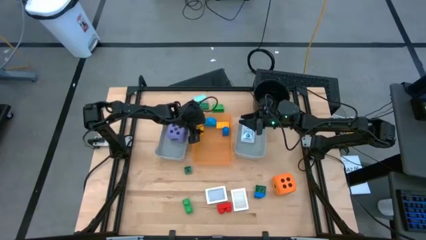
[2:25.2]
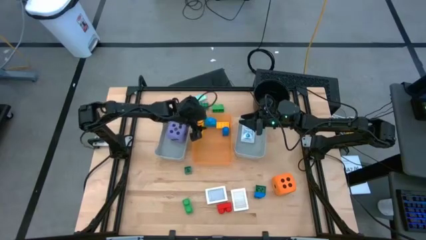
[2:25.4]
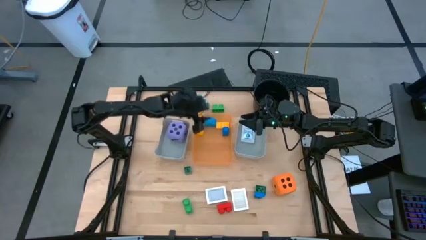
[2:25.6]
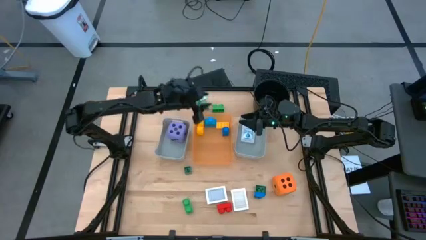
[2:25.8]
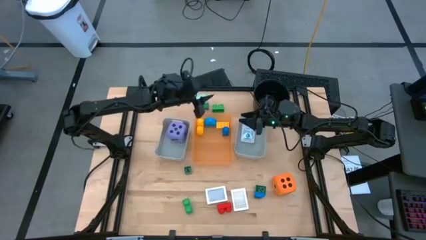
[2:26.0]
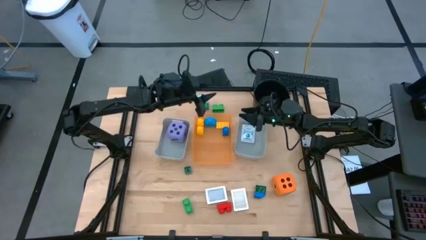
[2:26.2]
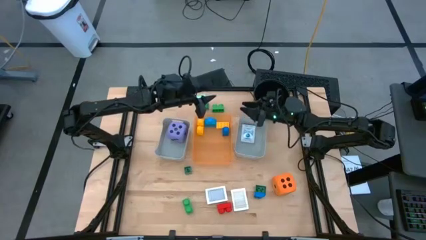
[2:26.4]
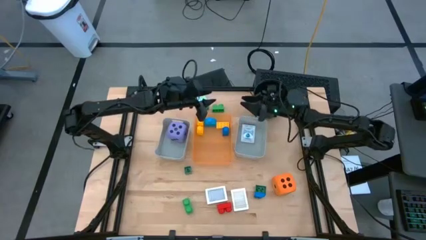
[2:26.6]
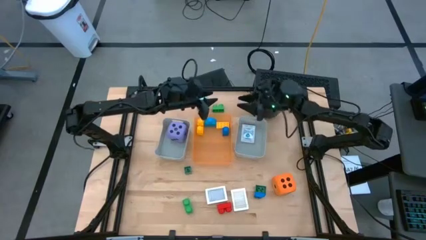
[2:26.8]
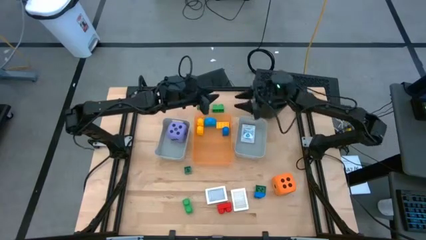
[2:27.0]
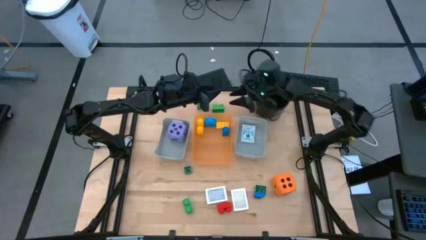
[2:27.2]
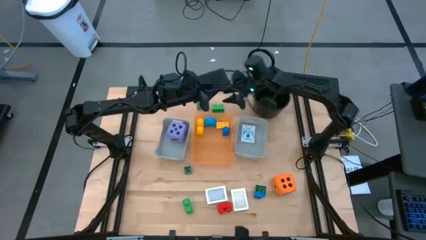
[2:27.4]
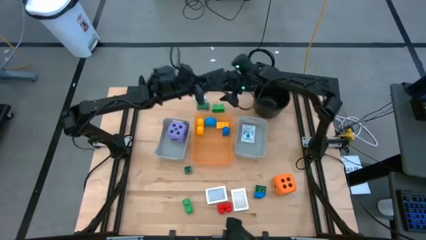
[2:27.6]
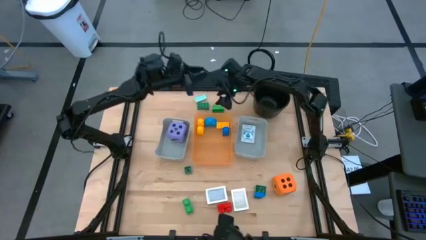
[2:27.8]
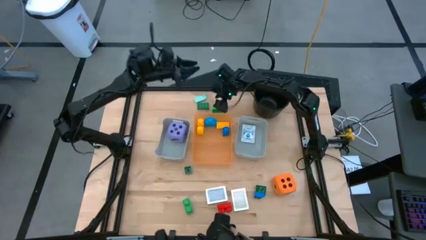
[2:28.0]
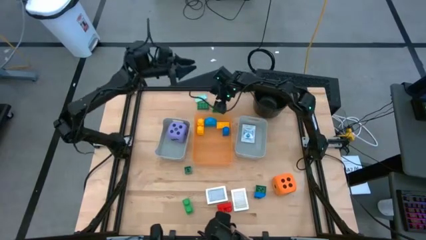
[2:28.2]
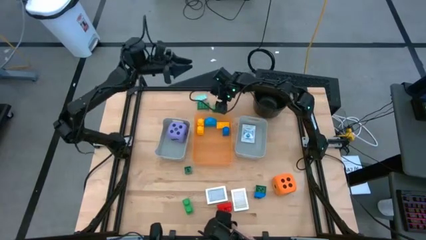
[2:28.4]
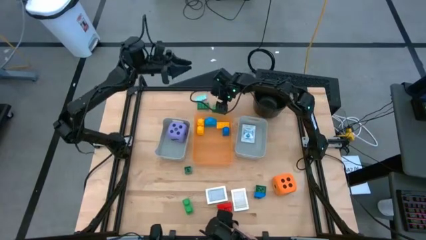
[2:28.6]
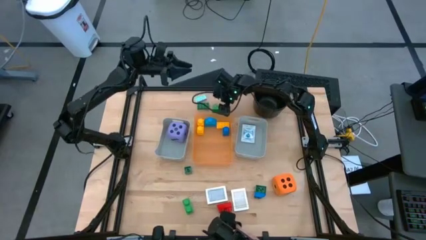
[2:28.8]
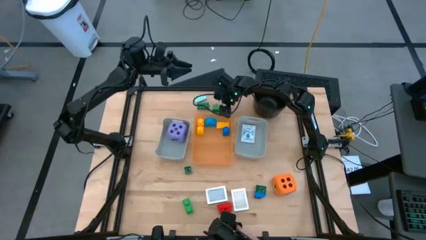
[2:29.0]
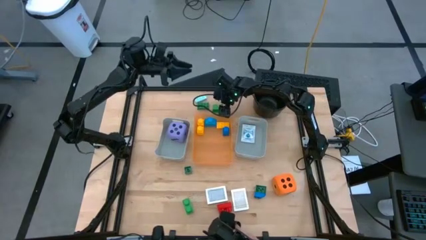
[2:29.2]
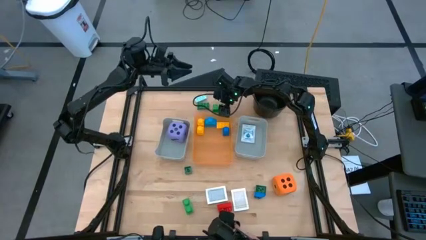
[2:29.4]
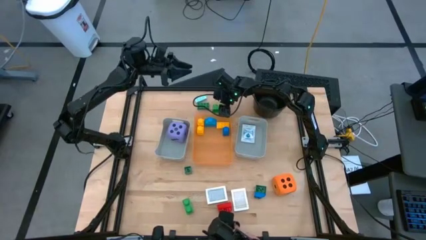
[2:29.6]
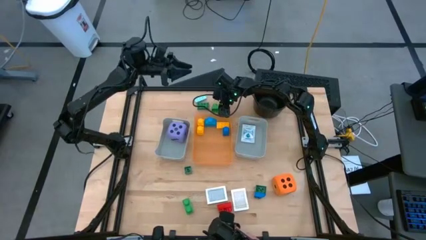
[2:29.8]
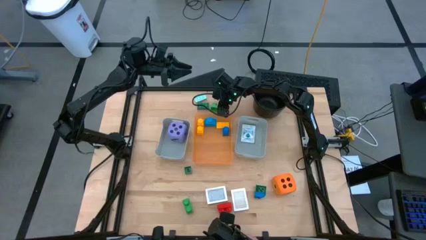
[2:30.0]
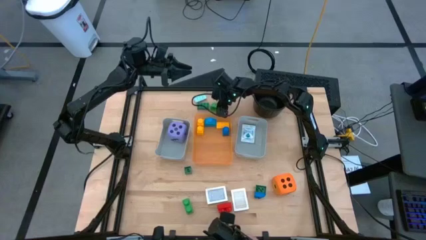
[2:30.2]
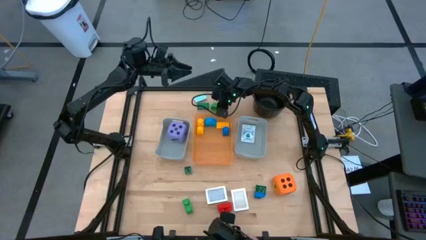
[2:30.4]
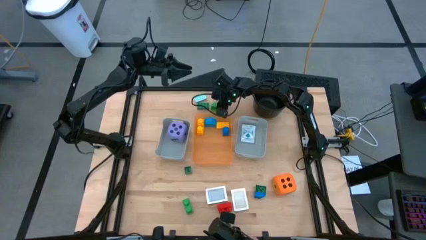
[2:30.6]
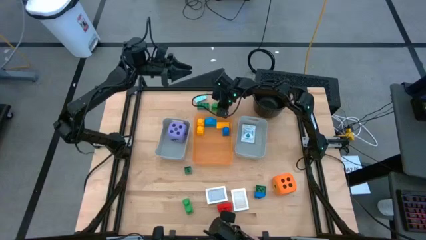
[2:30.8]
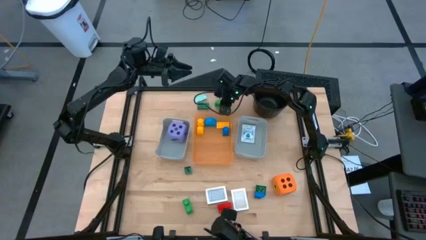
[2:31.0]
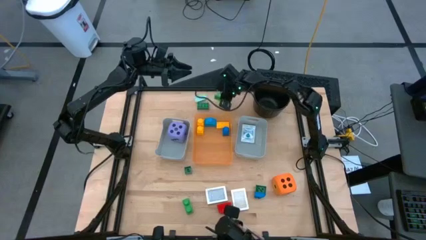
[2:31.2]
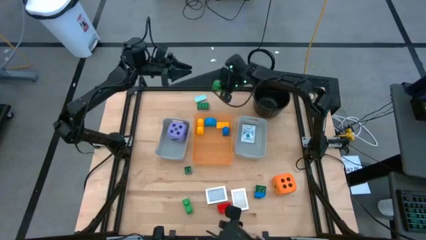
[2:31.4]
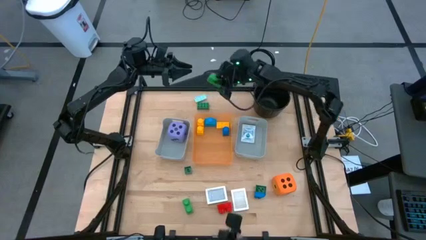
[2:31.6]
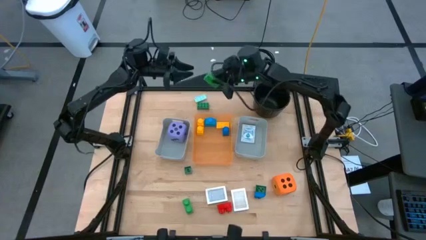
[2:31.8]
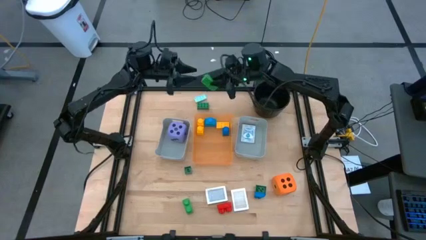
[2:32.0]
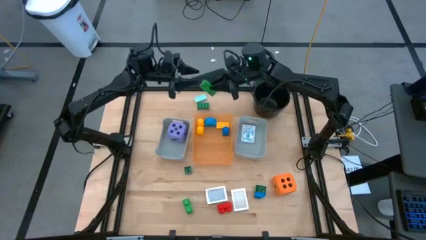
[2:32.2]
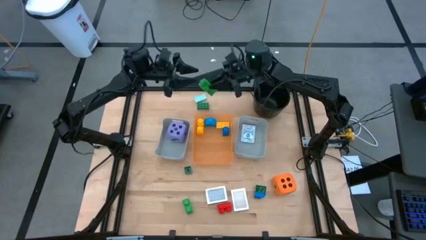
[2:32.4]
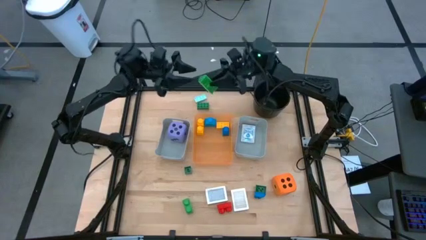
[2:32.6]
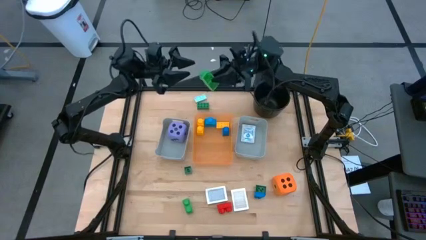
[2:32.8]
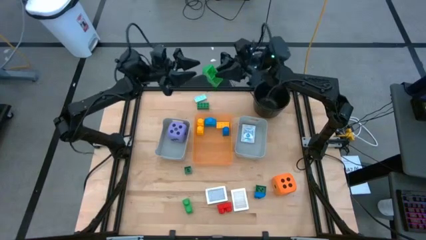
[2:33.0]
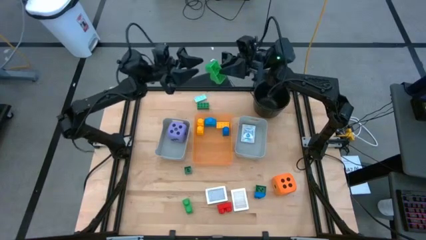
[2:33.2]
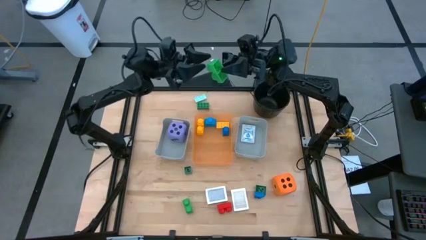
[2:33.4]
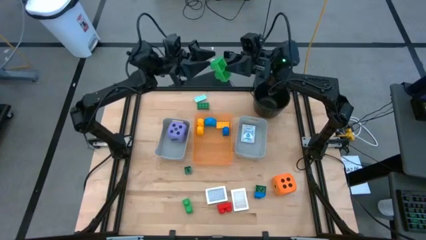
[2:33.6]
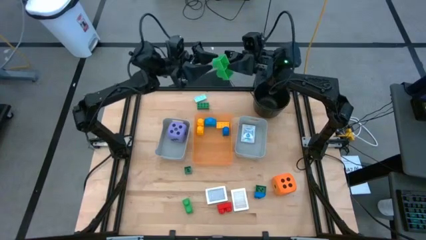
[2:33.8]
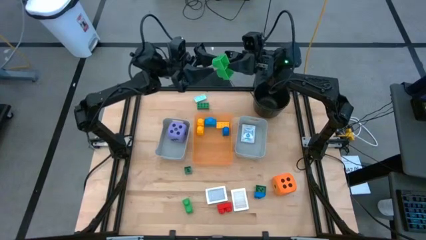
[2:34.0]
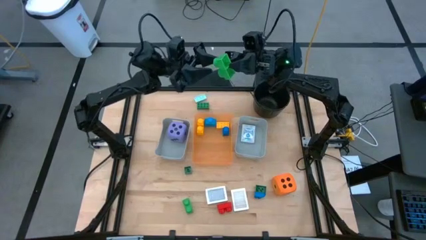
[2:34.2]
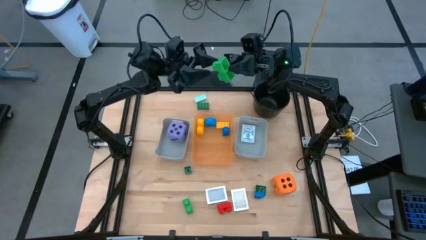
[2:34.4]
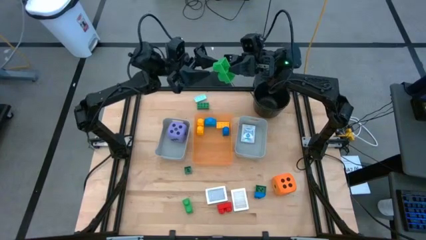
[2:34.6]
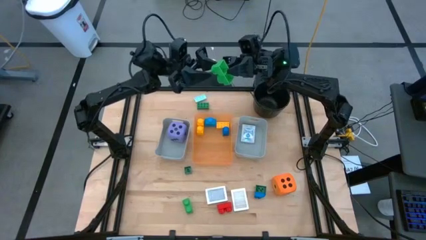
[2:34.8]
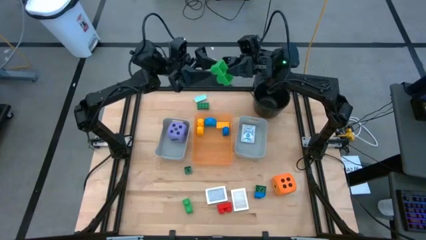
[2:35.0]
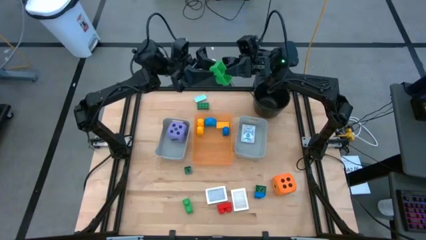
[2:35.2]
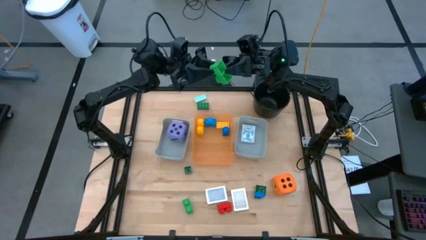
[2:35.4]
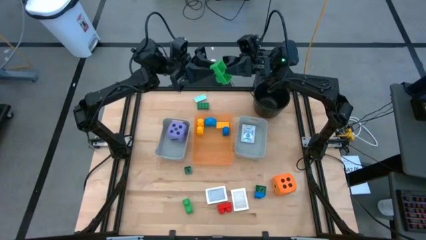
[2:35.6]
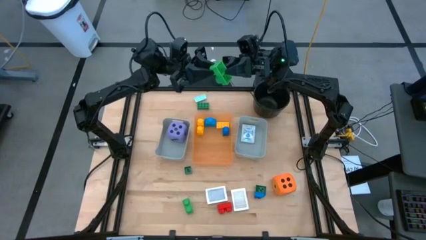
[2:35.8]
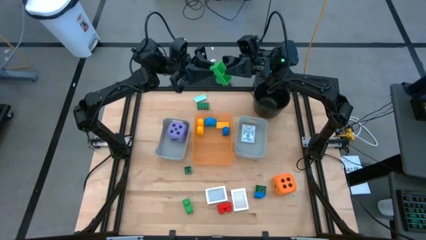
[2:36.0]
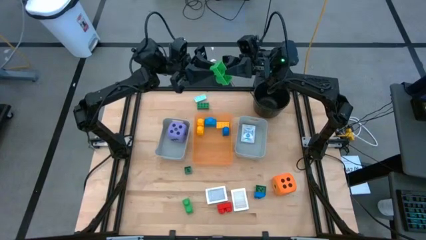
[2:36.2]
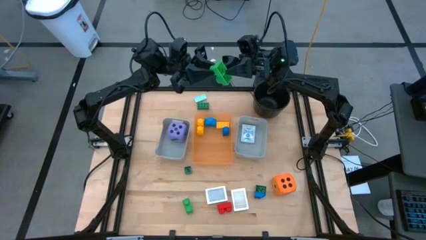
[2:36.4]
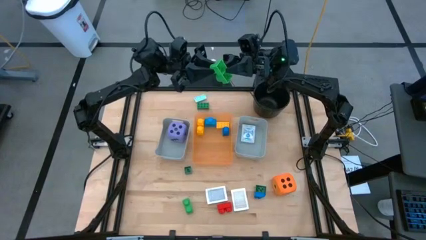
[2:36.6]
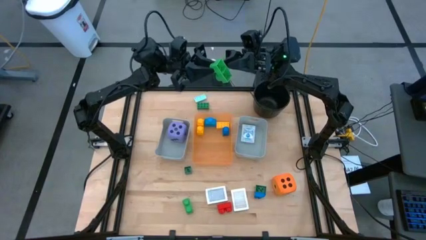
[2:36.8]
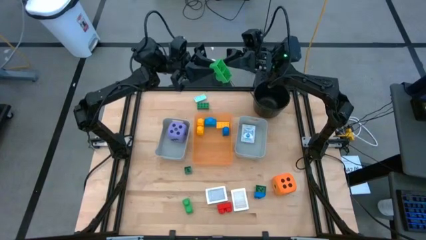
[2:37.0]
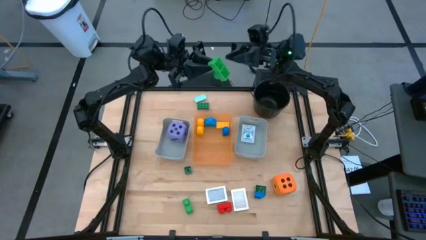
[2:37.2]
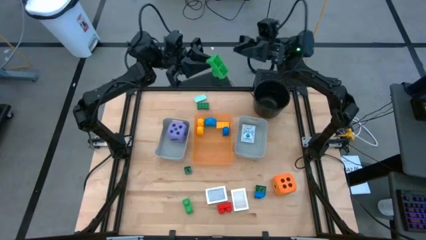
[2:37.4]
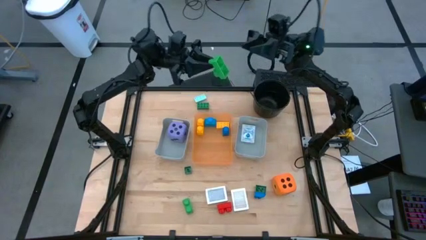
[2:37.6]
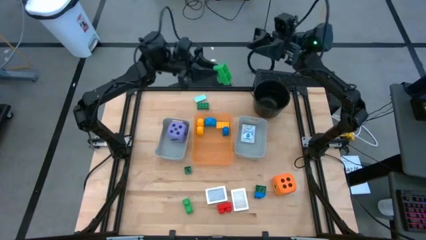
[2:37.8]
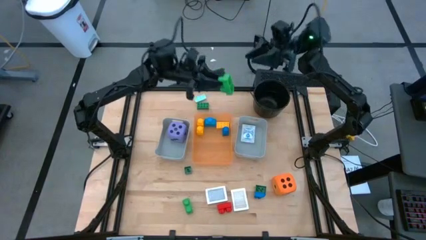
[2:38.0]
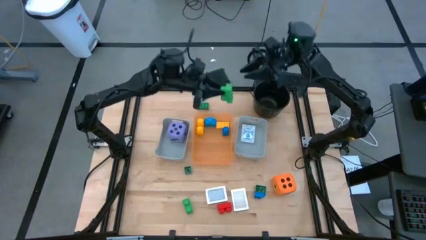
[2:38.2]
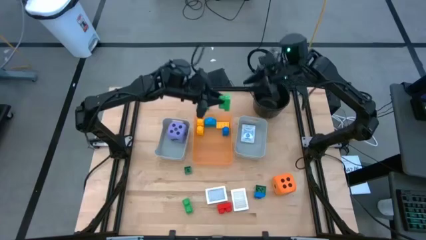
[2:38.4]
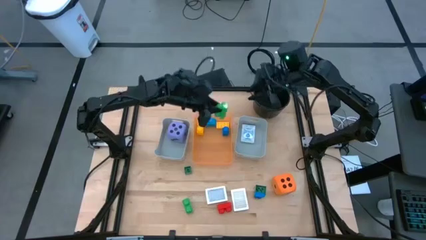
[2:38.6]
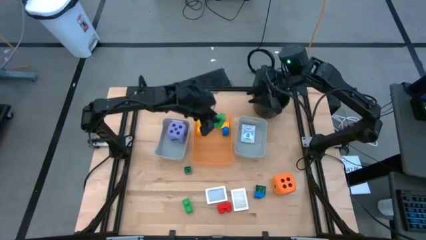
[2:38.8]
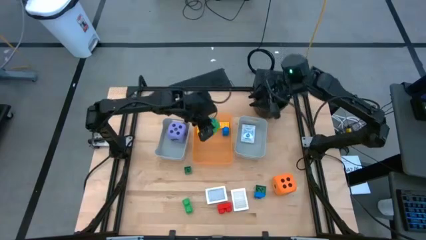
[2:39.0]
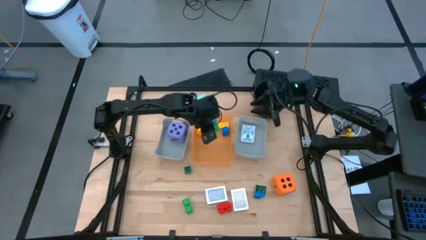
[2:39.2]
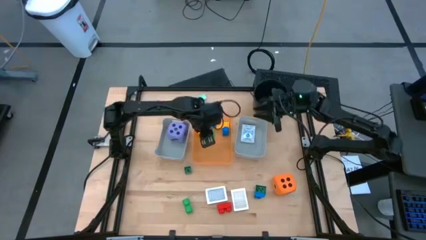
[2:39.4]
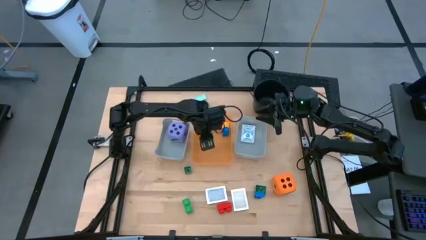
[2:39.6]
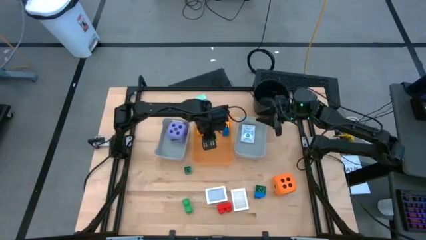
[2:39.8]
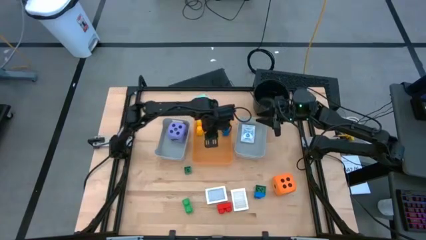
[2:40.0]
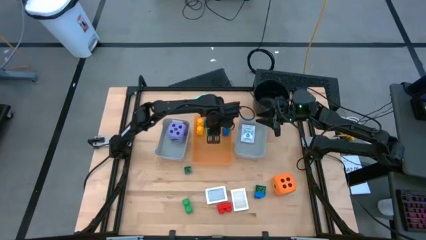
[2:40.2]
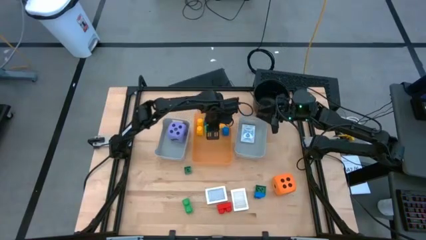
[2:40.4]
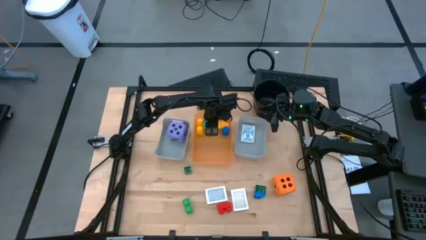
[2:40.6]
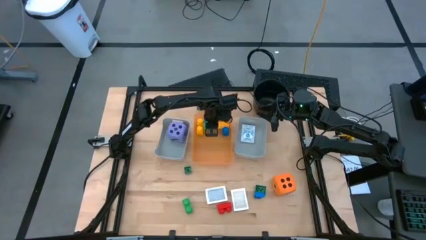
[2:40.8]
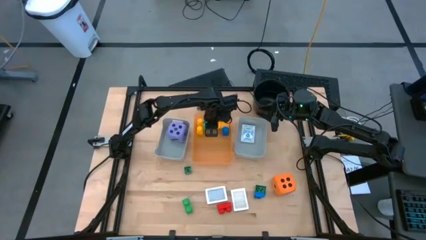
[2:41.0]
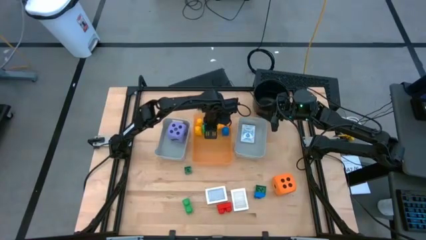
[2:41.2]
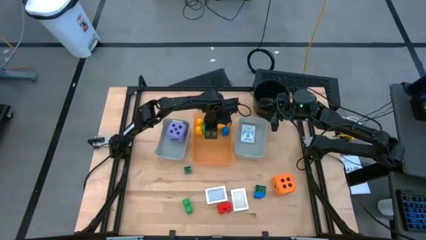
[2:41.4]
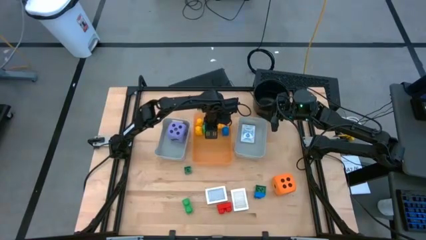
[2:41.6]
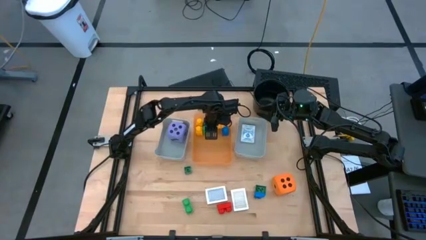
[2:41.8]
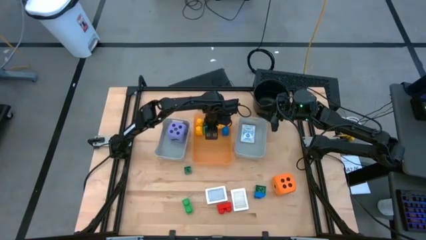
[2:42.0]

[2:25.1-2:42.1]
Task: Pick & Place Toys
Put the green game piece into the orange bin
